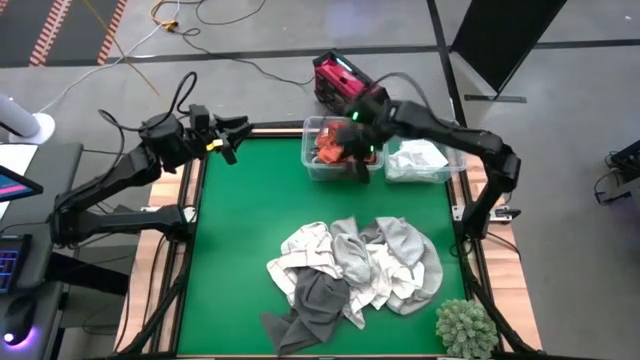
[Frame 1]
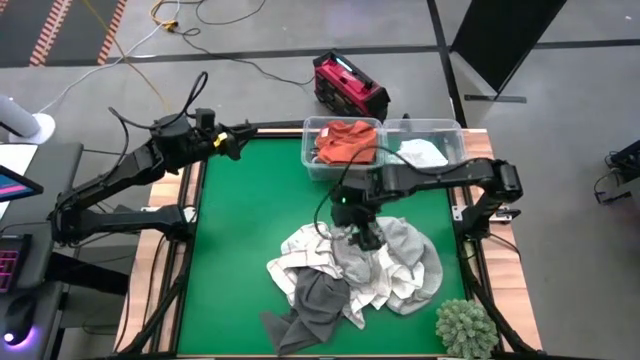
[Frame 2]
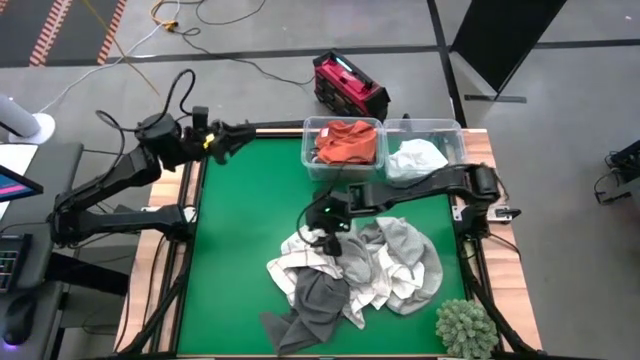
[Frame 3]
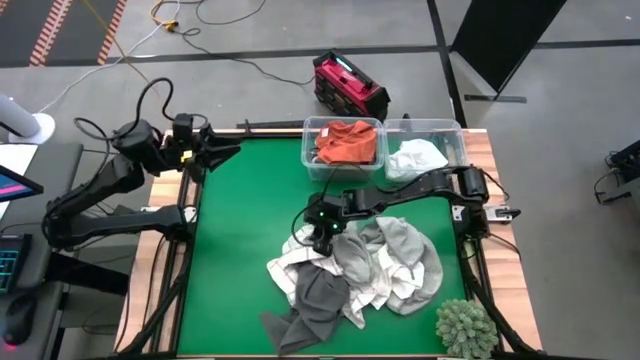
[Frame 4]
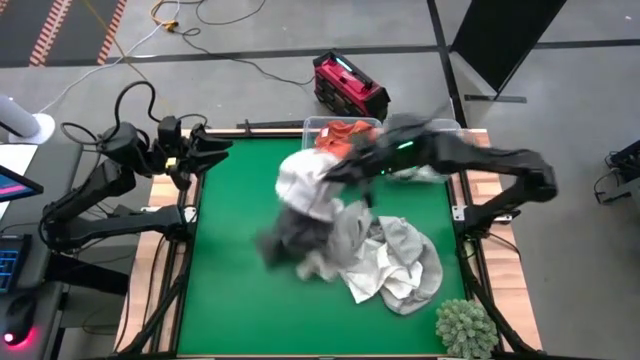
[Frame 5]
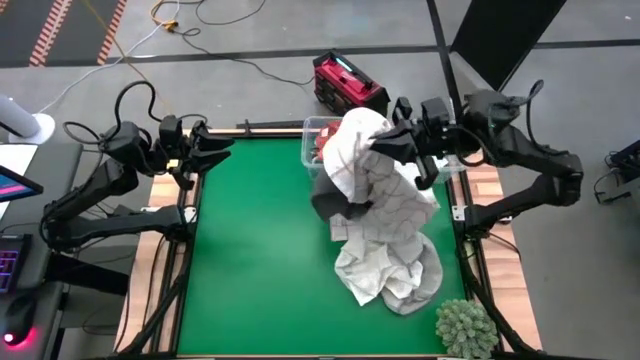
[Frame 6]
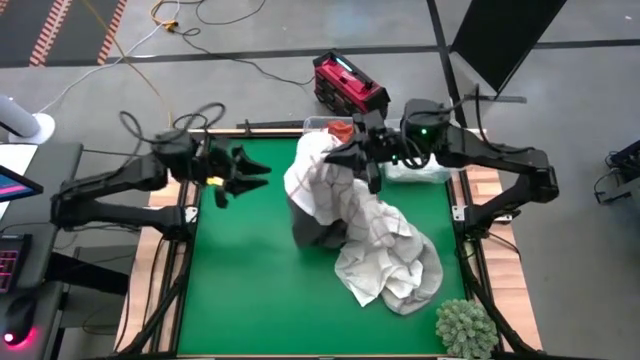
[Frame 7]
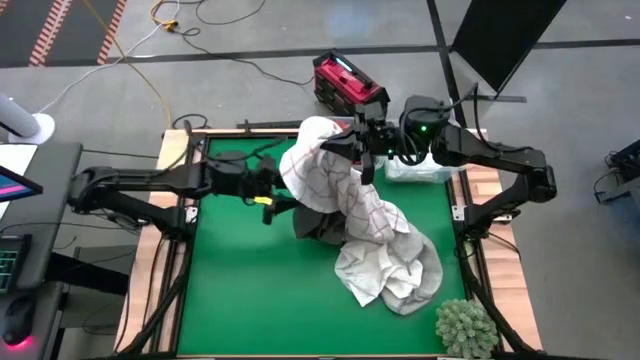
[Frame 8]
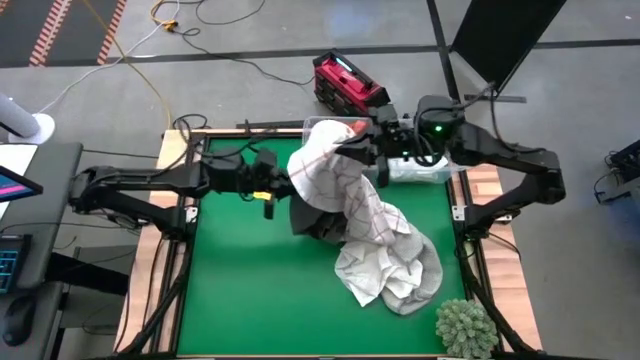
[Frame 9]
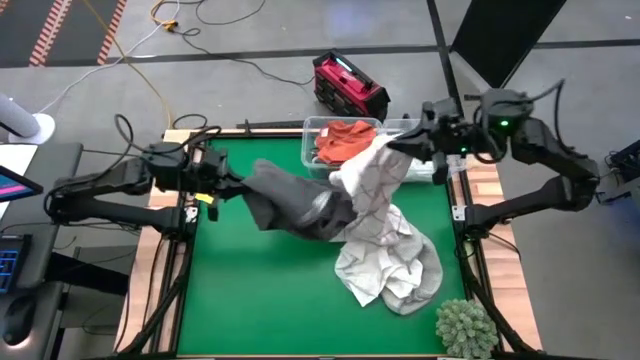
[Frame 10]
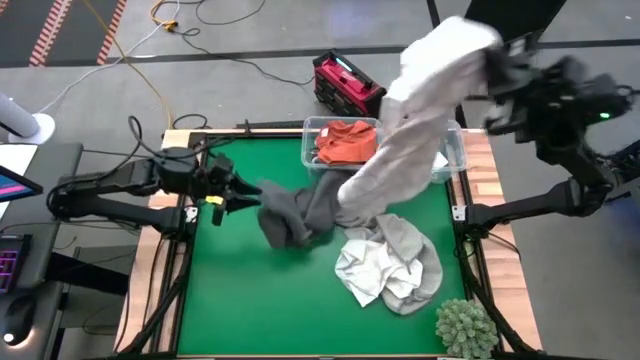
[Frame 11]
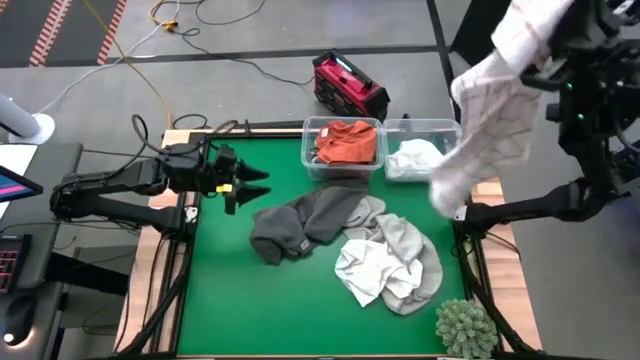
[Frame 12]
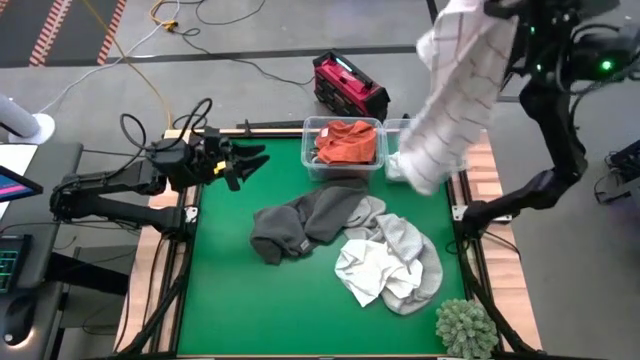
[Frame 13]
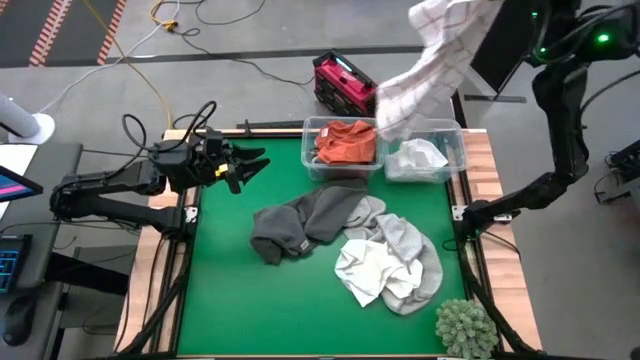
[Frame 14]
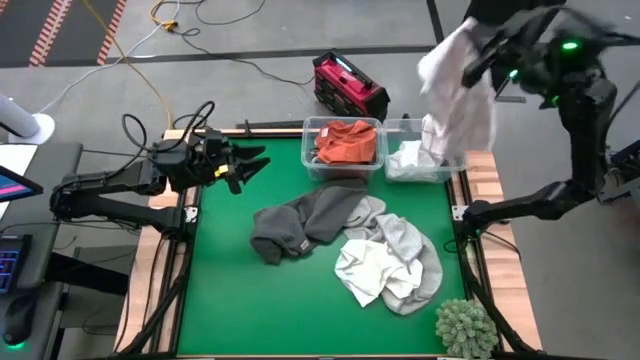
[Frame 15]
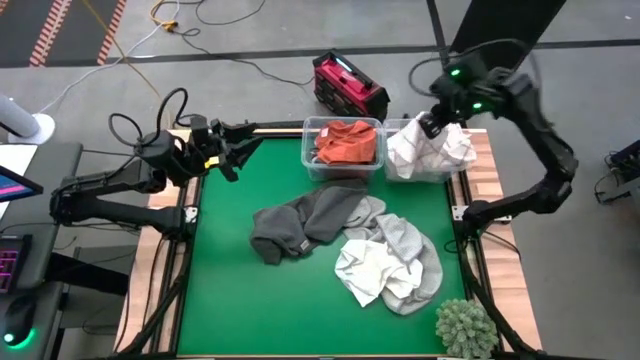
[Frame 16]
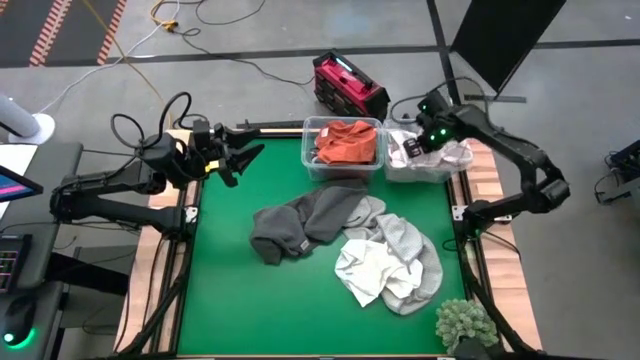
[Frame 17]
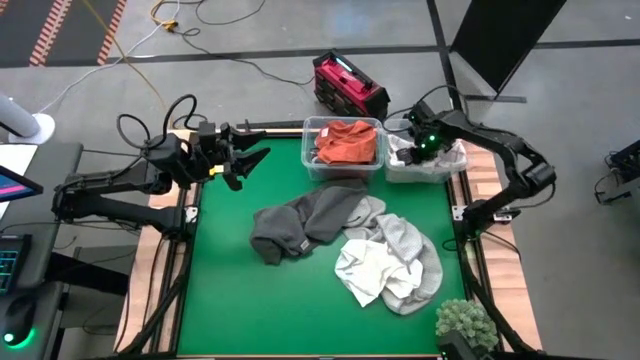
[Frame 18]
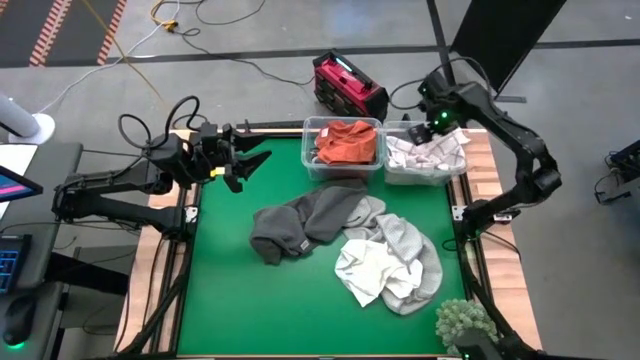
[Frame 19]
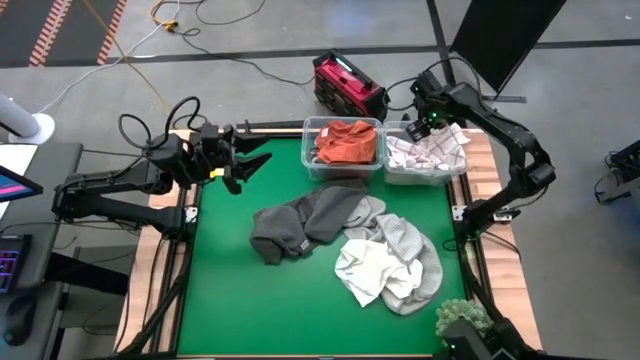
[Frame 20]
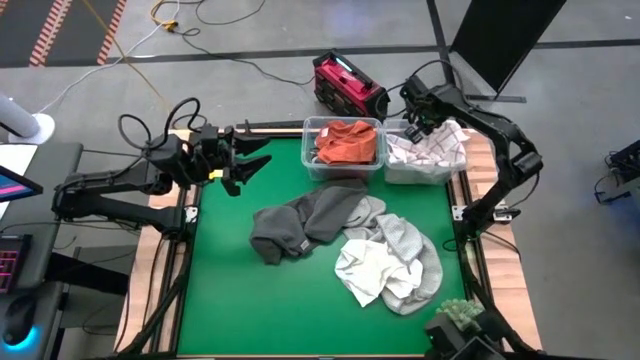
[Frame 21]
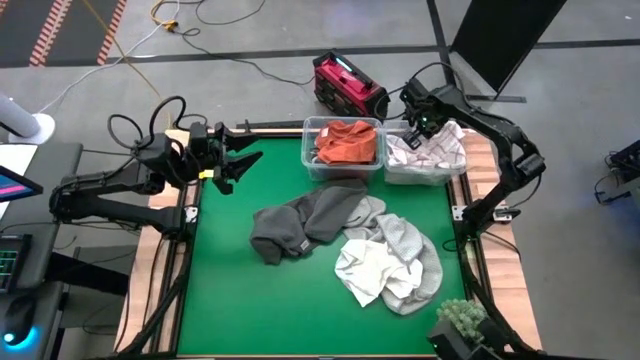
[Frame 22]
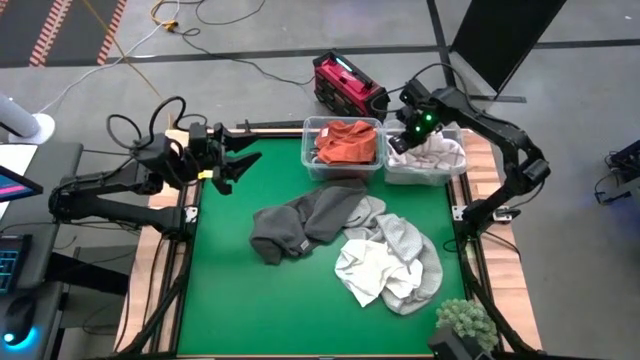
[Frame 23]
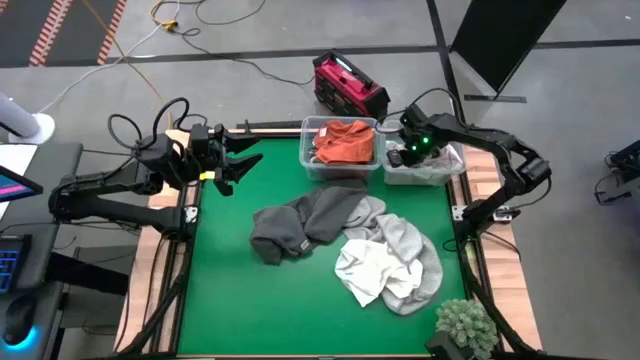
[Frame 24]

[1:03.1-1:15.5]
Task: Sort towels by color in basket
Put the white-brown towel into the right transparent bin

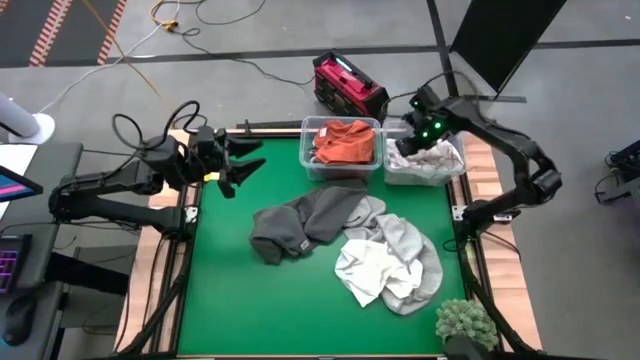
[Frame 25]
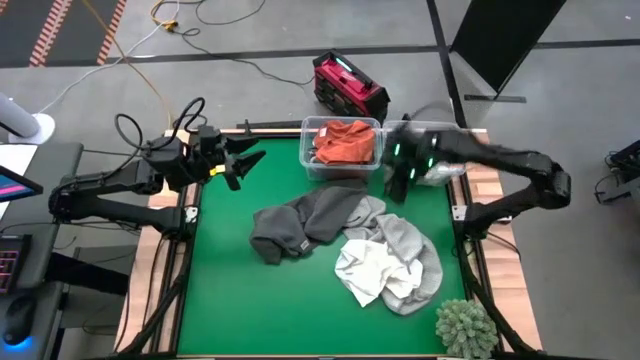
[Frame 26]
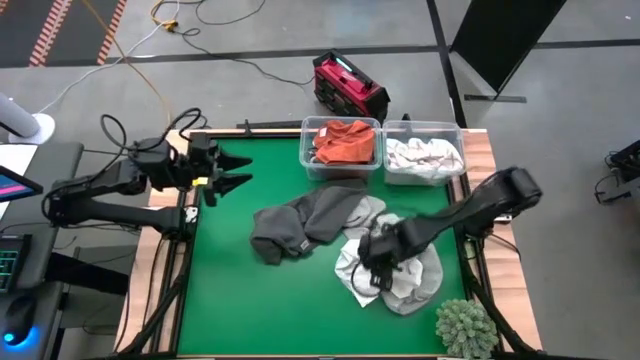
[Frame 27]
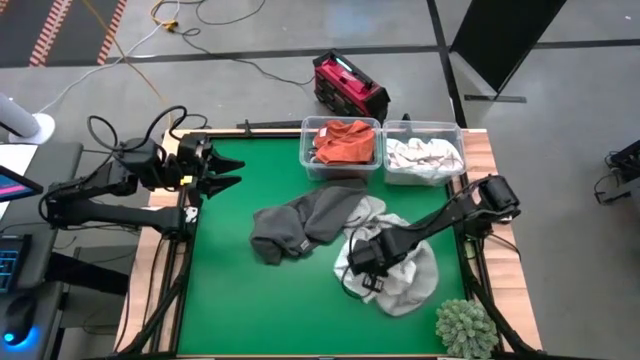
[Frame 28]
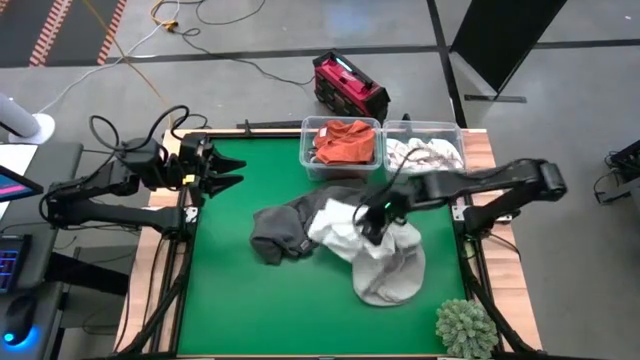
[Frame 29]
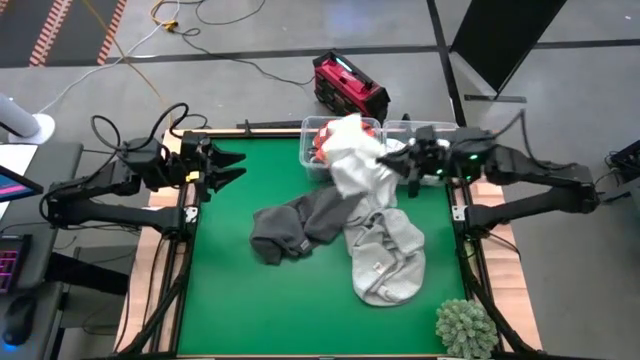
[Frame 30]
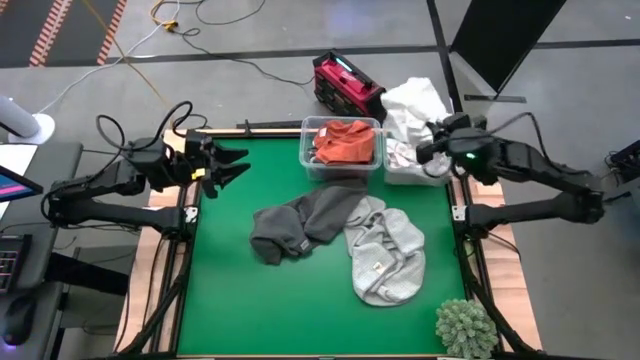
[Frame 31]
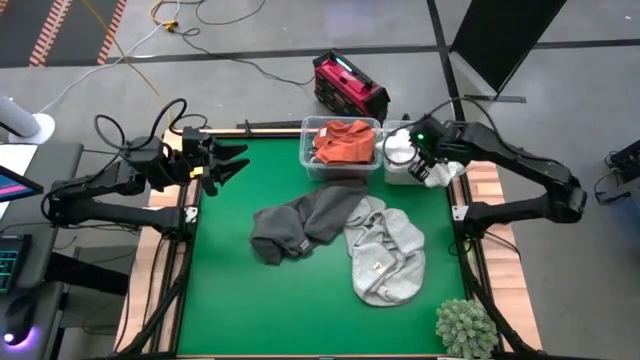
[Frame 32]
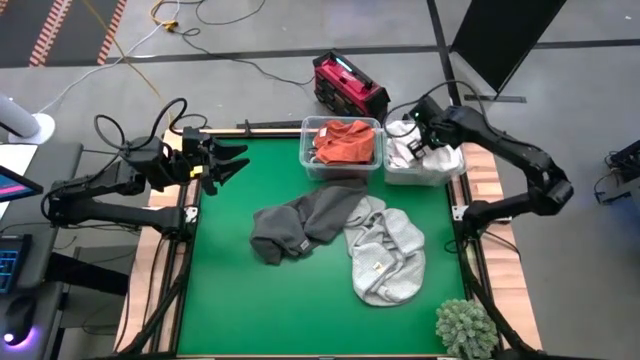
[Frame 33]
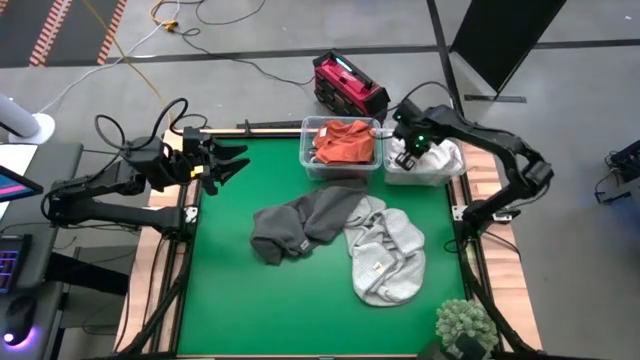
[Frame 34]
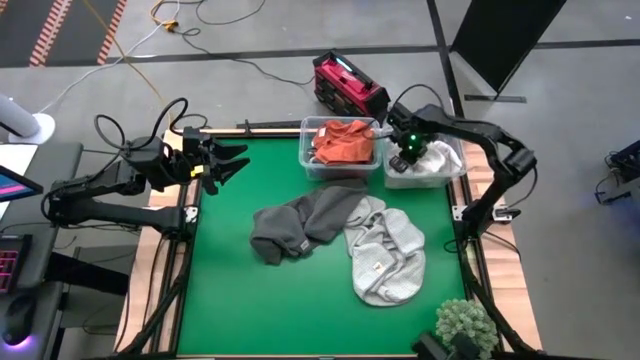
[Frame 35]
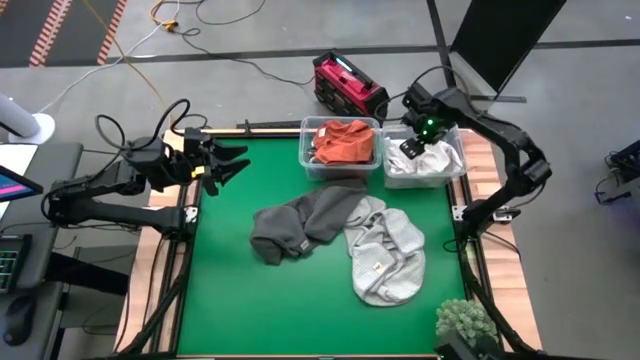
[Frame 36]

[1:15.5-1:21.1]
Put the white towel into the right transparent bin

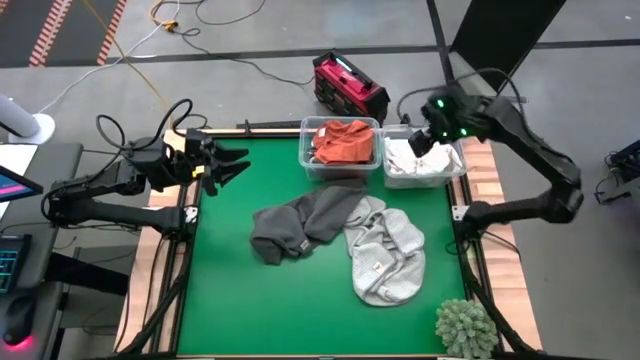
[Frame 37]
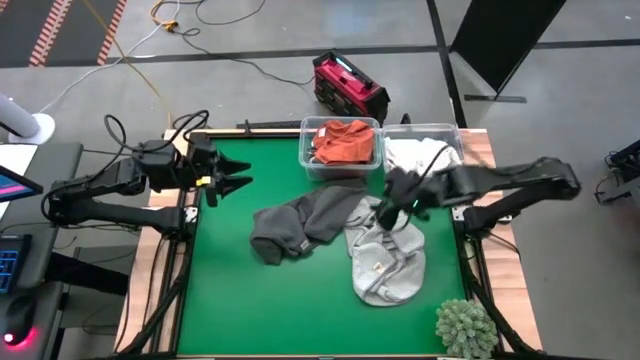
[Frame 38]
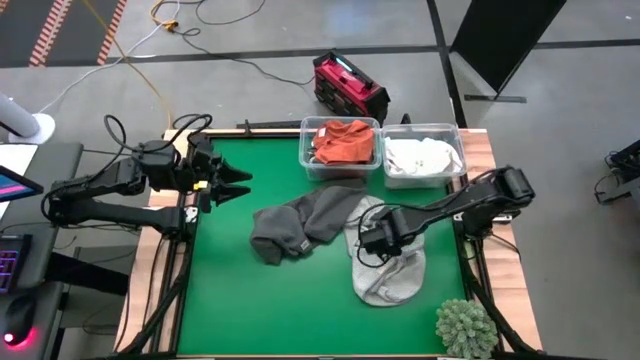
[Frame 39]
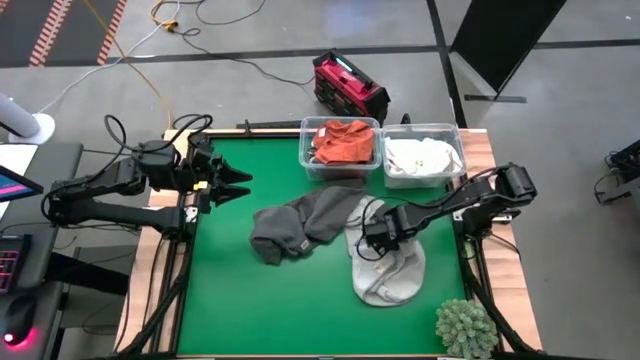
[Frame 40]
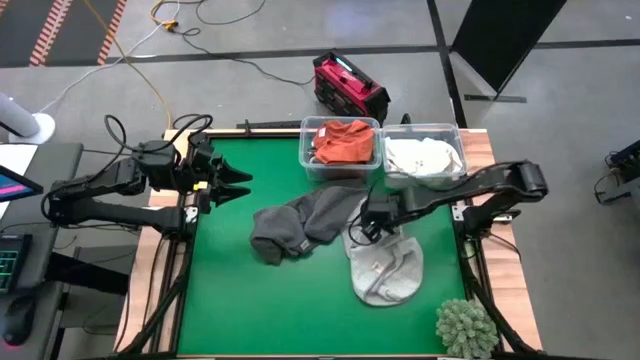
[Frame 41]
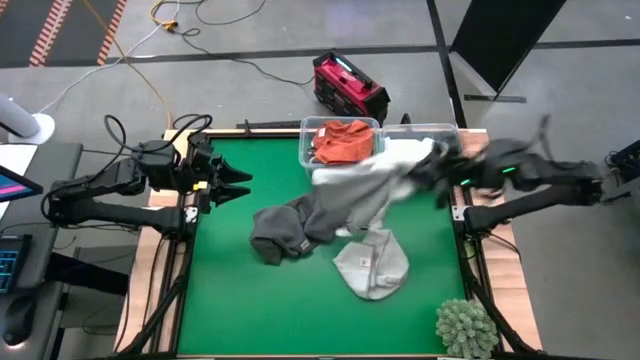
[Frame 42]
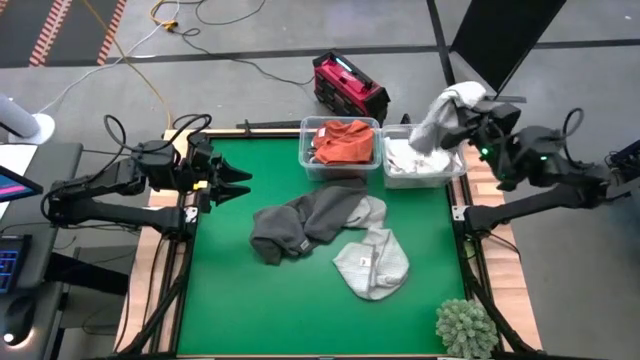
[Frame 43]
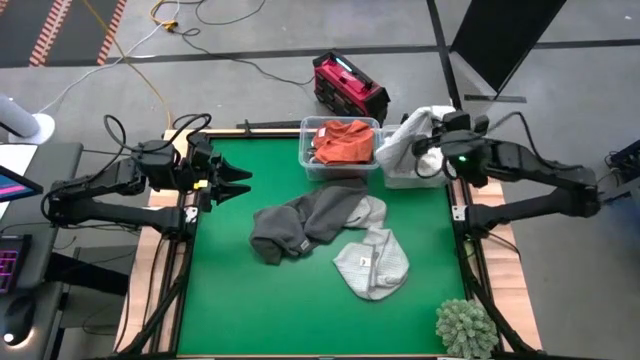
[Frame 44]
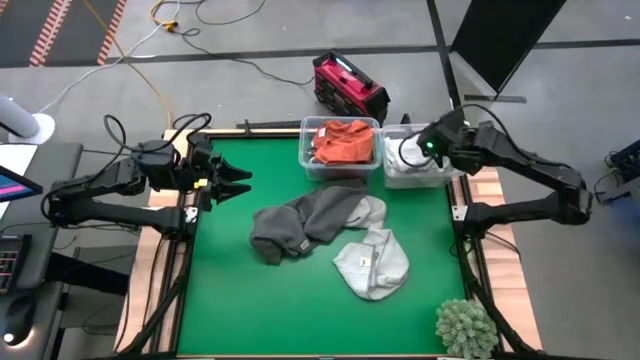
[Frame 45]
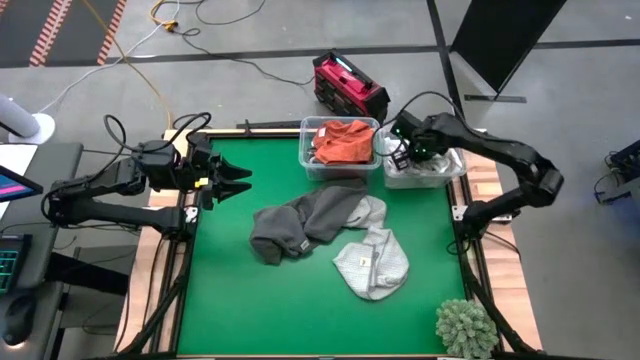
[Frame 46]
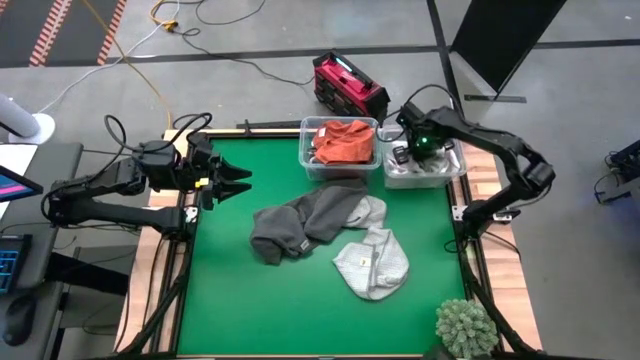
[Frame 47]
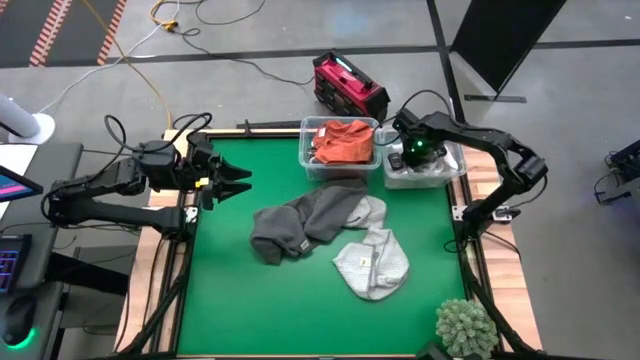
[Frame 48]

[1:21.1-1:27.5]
Put the light gray towel into the right transparent bin
